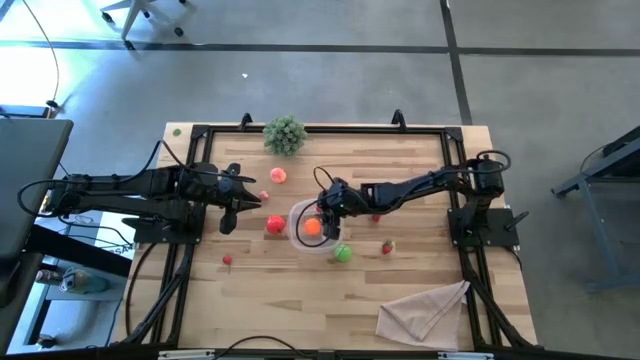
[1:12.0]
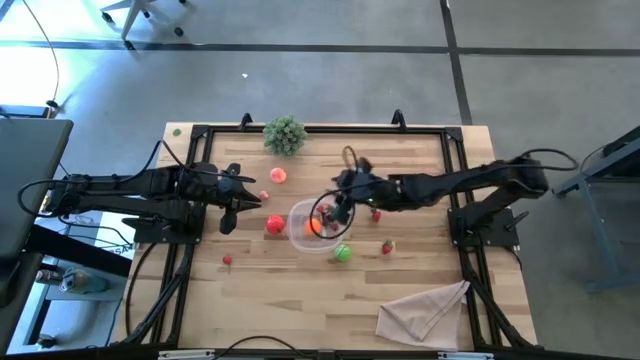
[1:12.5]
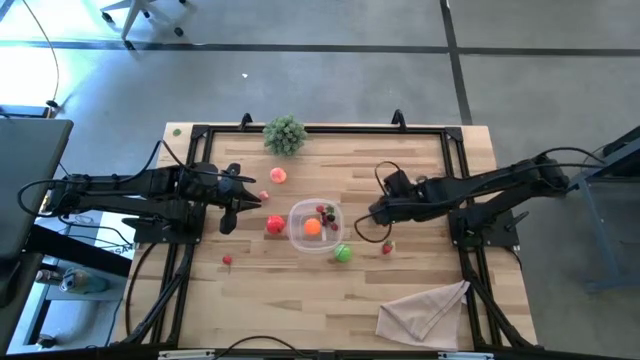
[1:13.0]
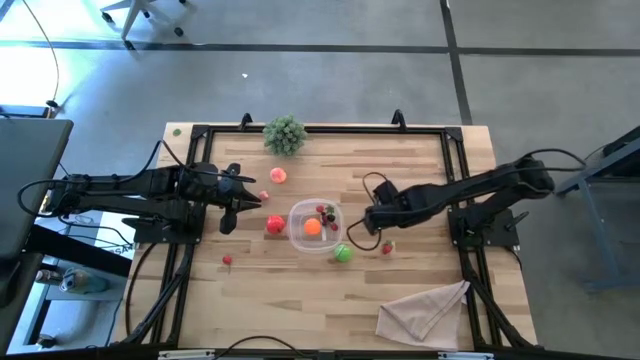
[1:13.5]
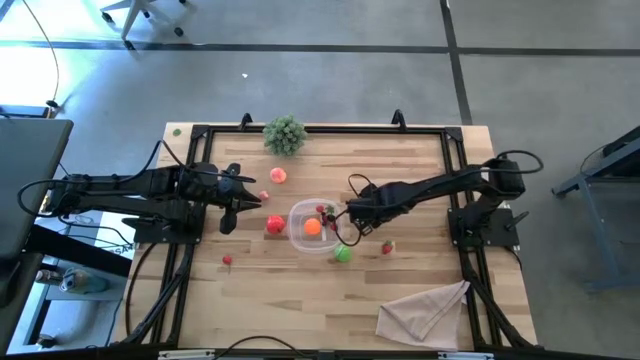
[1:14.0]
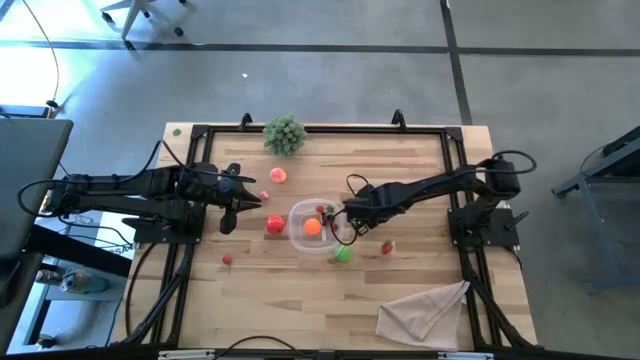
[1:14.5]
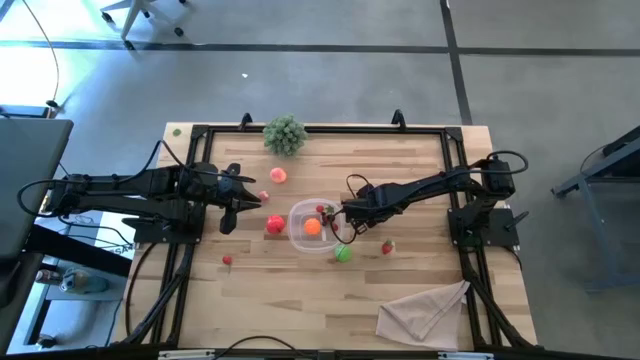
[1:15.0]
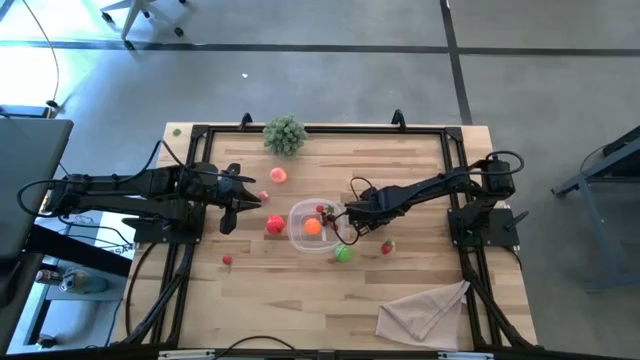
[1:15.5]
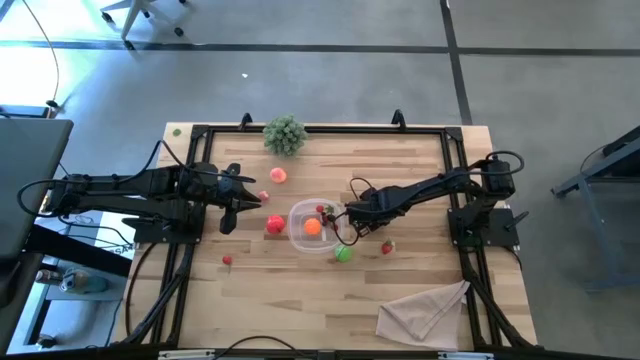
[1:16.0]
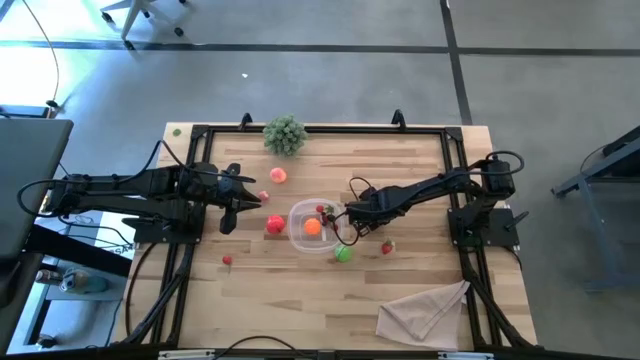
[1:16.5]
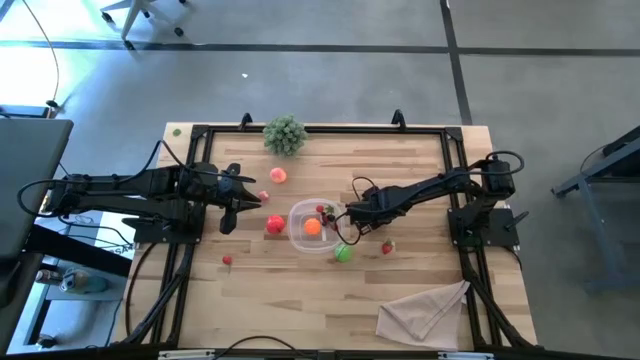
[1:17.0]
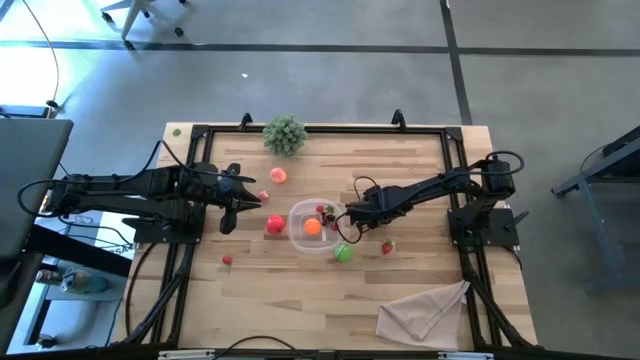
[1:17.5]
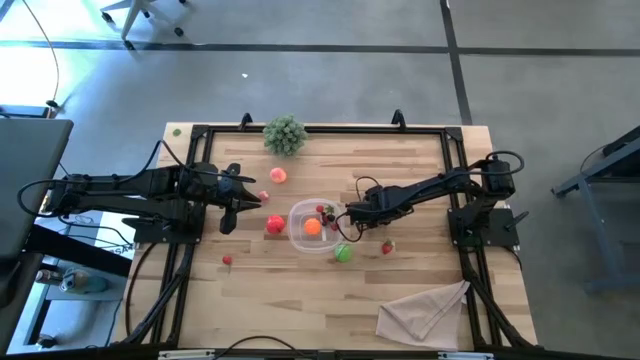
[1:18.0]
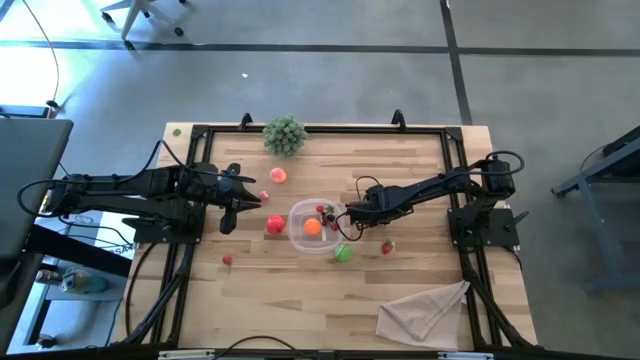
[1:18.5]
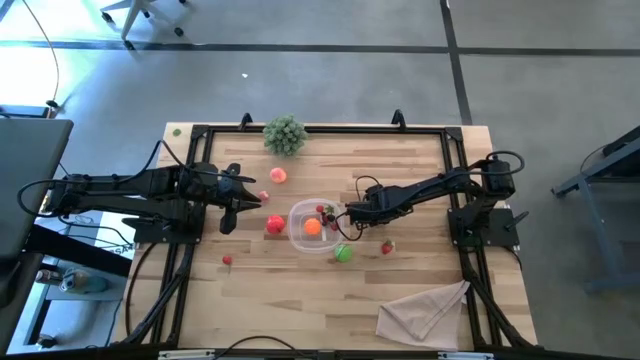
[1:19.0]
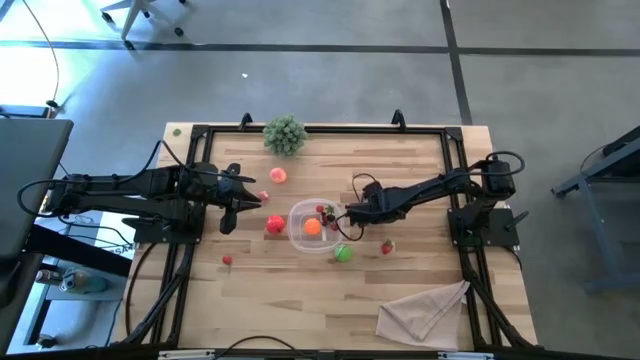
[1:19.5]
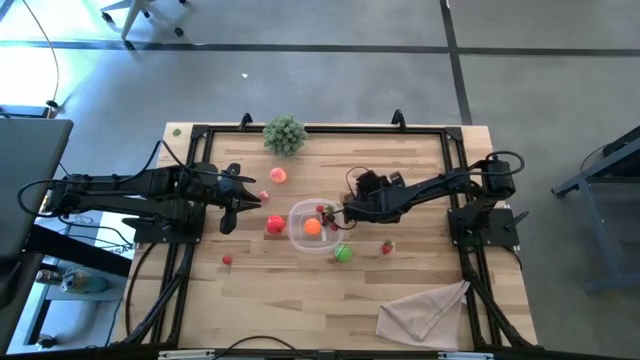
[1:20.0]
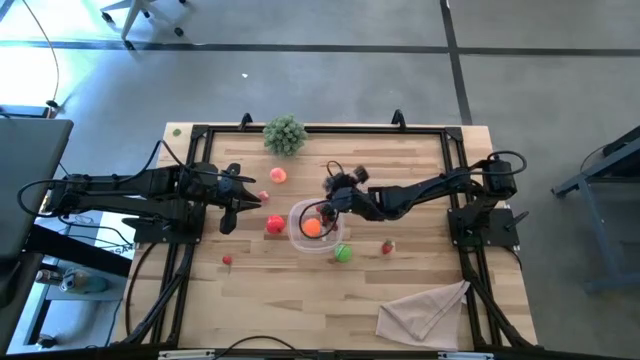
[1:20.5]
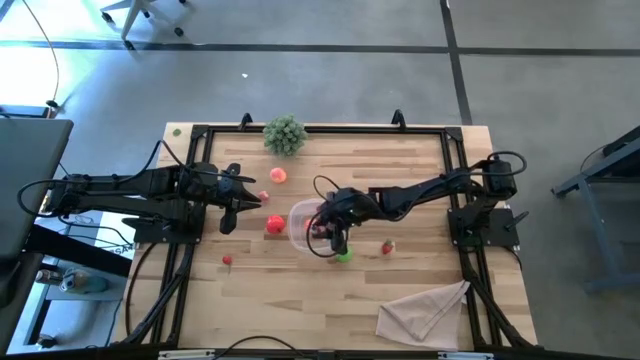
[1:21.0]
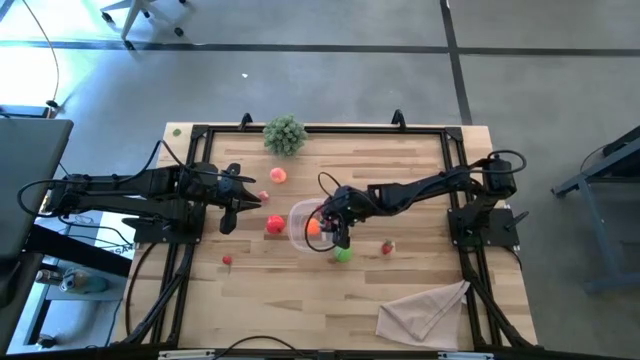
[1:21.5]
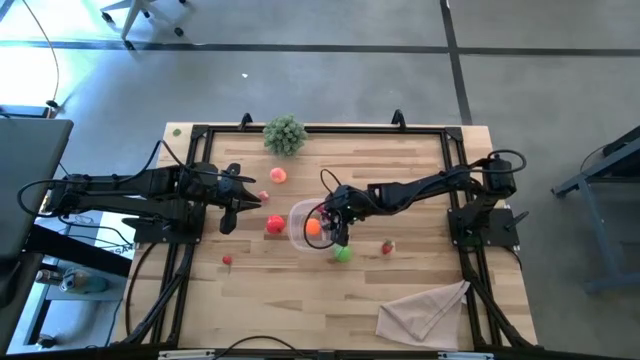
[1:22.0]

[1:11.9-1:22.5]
Task: Pick and placing Produce into tupperware
Put the top strawberry into the transparent bin

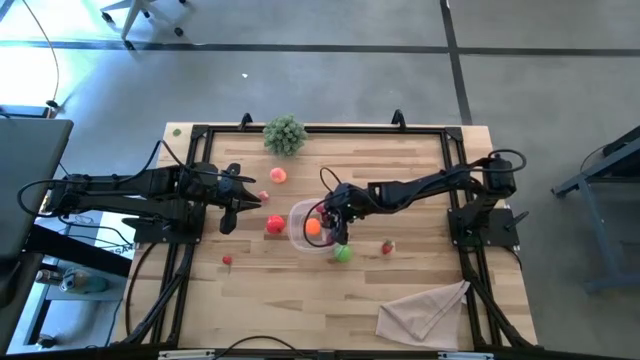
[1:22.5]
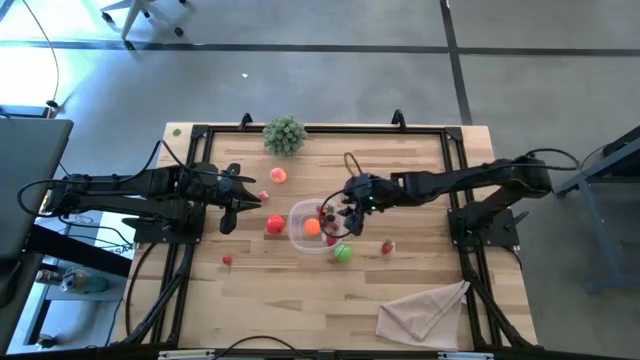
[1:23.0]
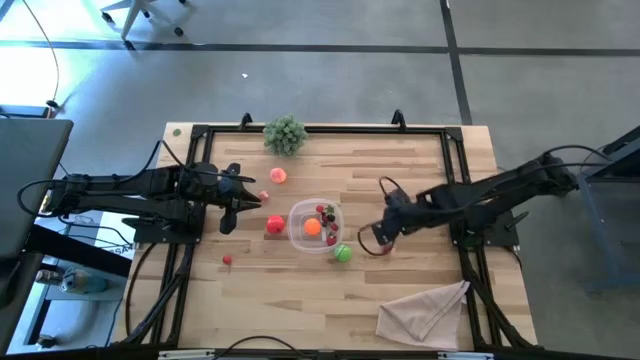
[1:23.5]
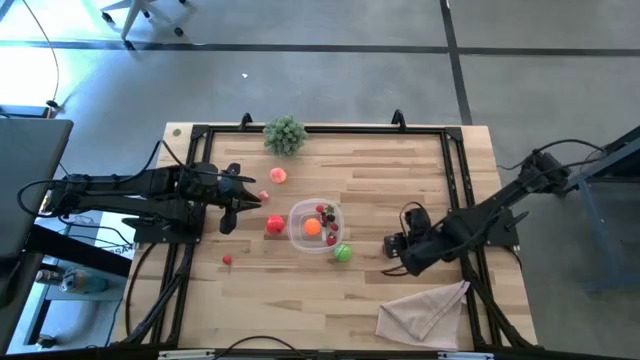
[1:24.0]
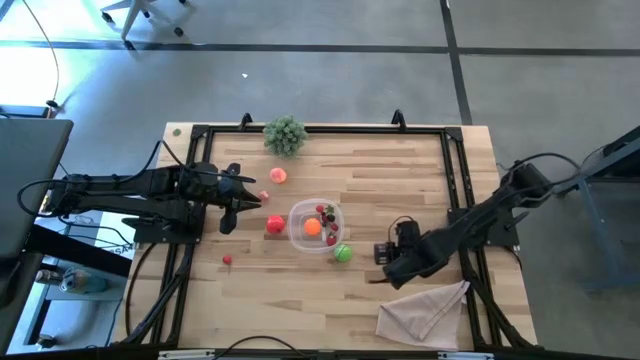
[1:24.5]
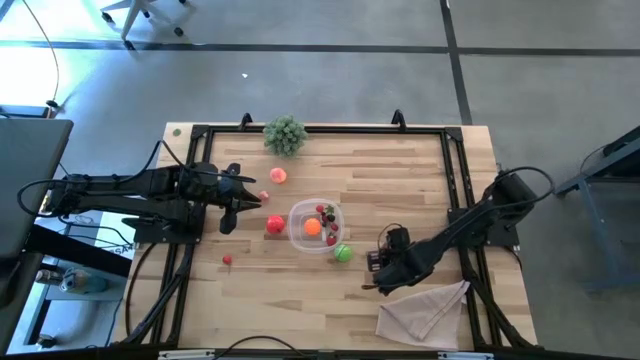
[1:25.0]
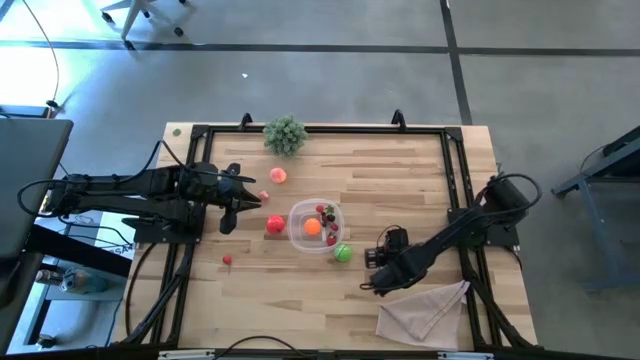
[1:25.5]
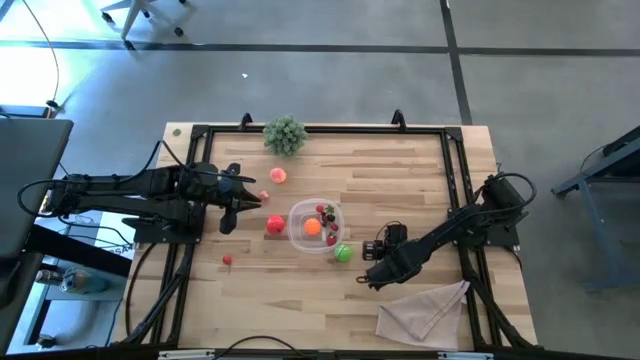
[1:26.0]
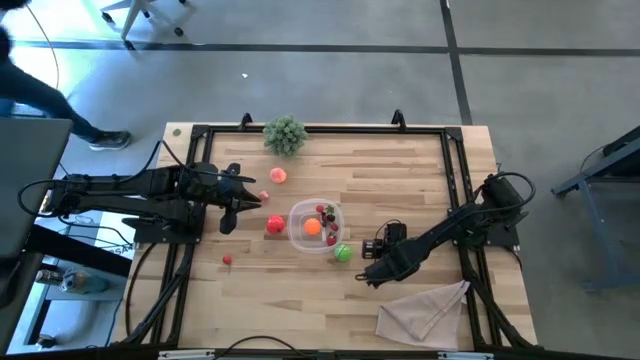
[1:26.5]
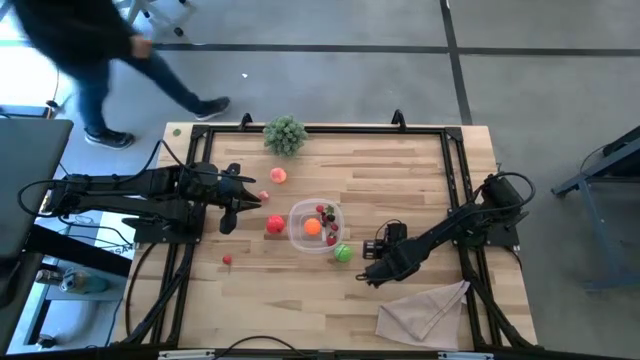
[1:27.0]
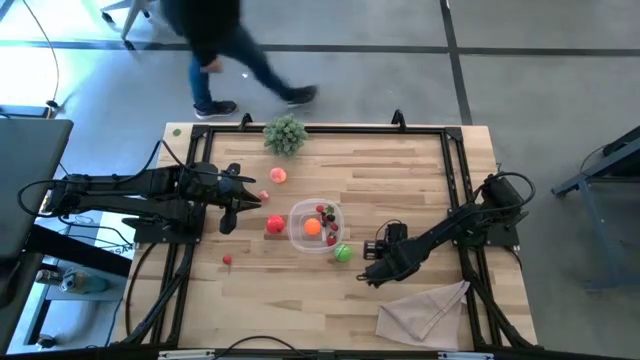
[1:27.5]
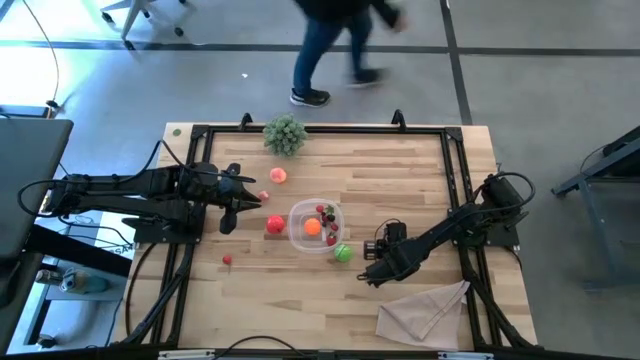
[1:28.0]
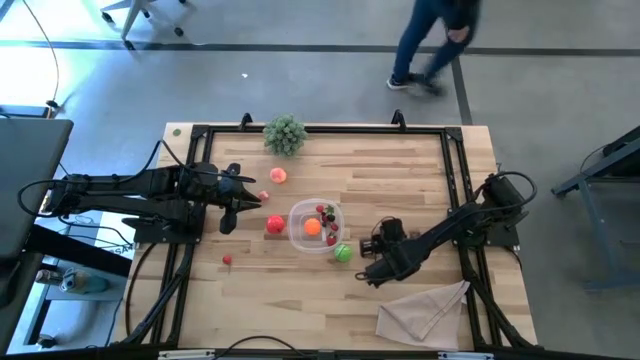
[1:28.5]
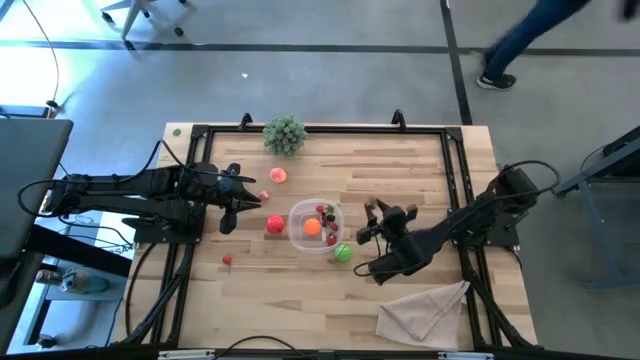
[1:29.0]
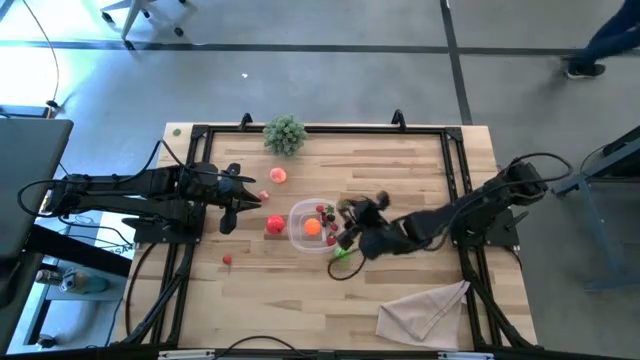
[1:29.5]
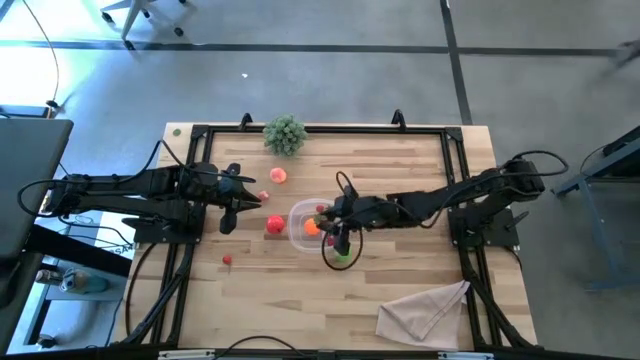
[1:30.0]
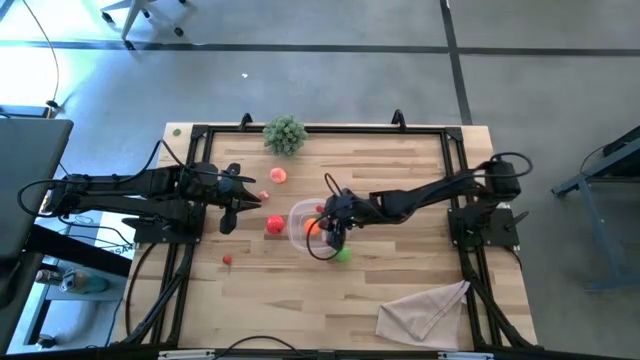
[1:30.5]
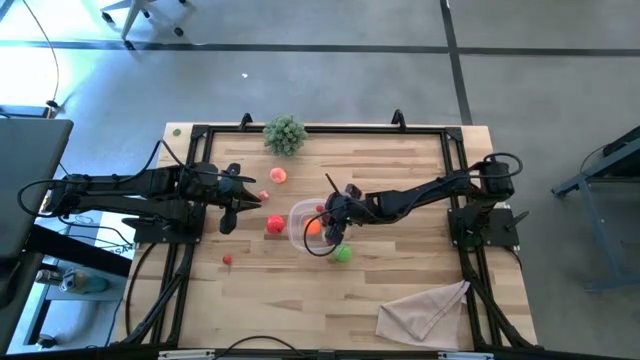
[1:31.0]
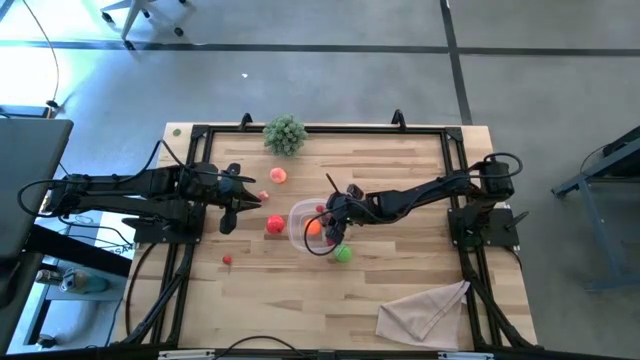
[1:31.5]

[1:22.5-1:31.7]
Put the strawberry into the transparent bin
